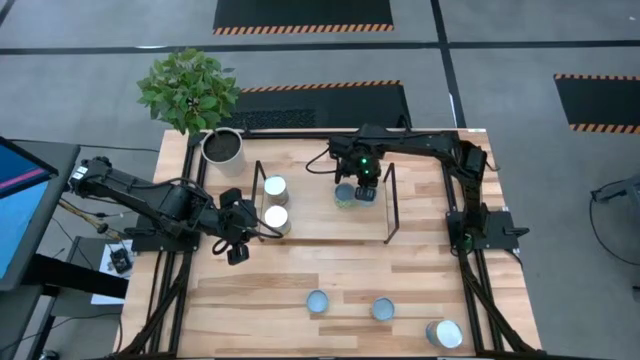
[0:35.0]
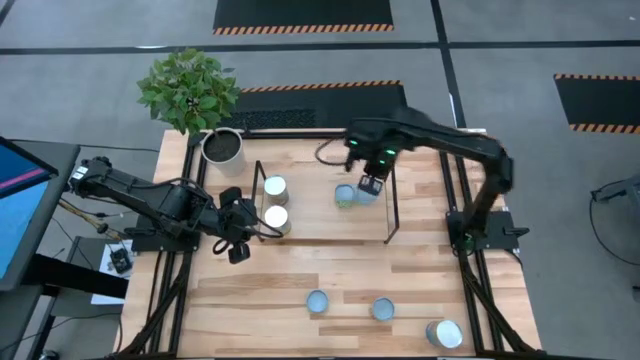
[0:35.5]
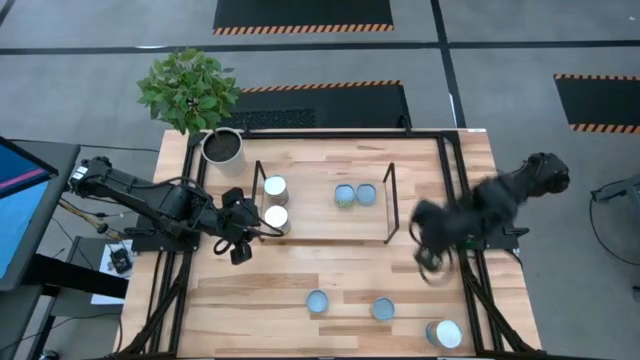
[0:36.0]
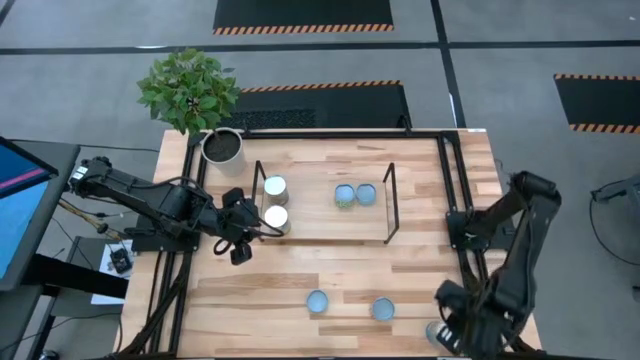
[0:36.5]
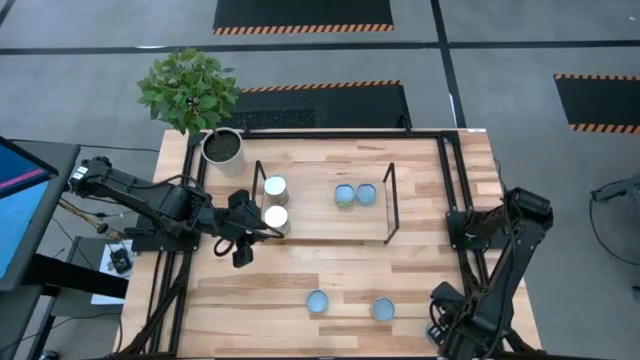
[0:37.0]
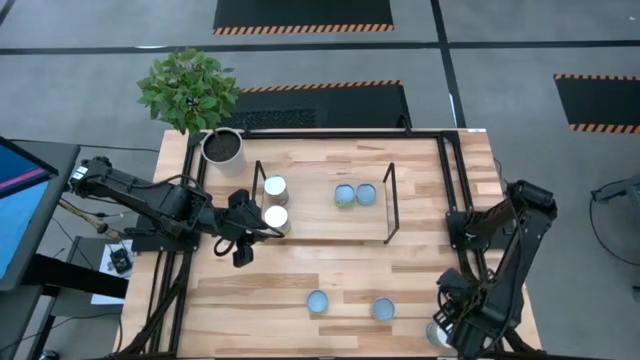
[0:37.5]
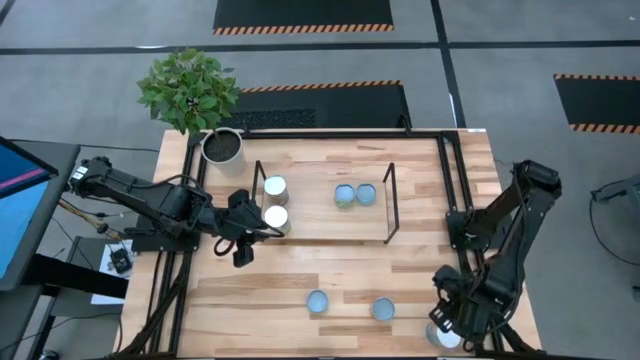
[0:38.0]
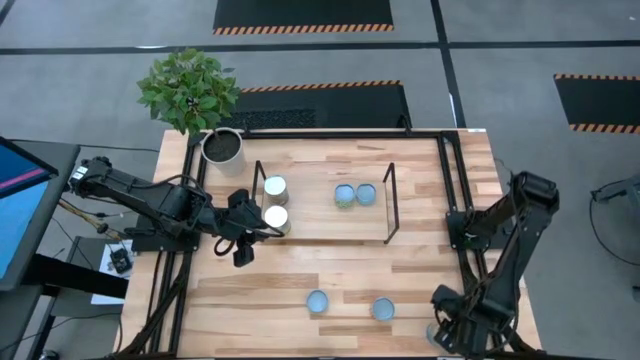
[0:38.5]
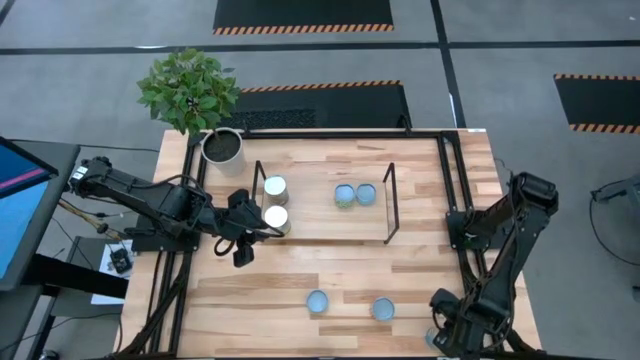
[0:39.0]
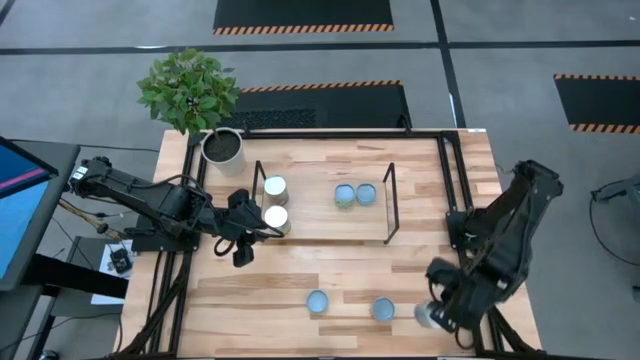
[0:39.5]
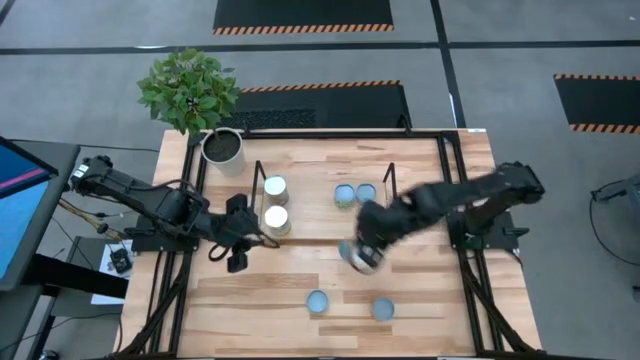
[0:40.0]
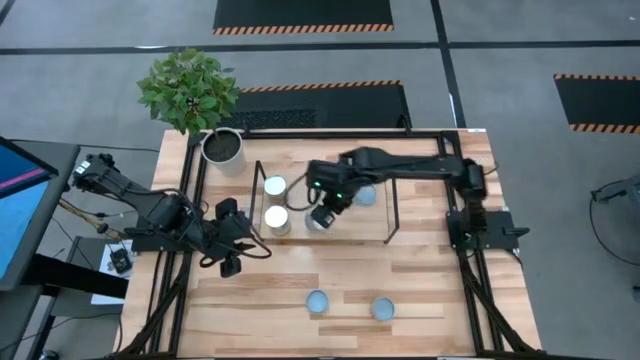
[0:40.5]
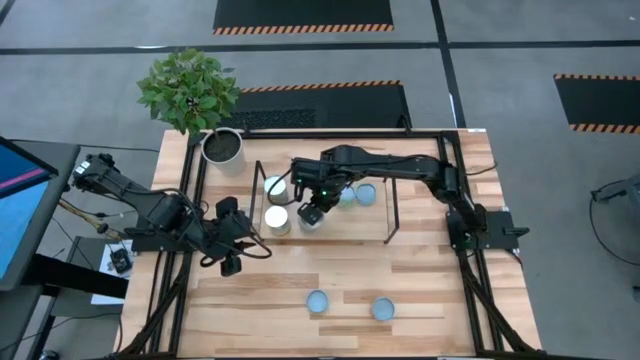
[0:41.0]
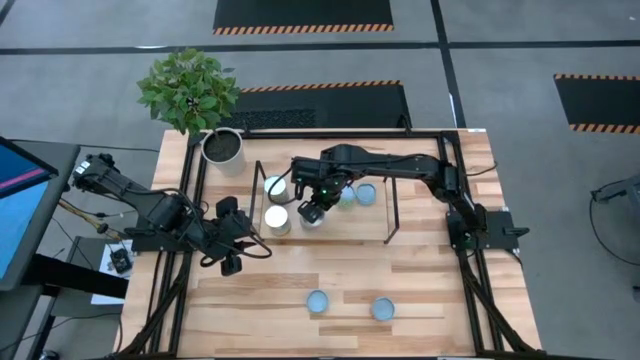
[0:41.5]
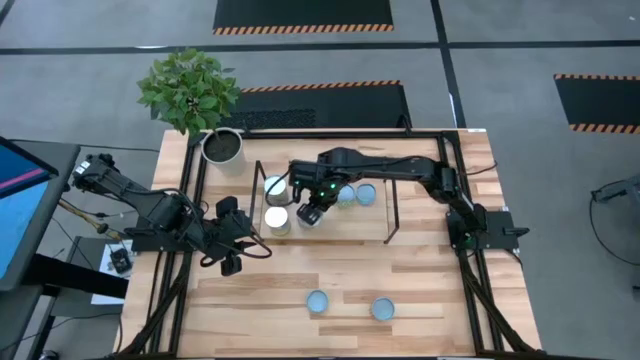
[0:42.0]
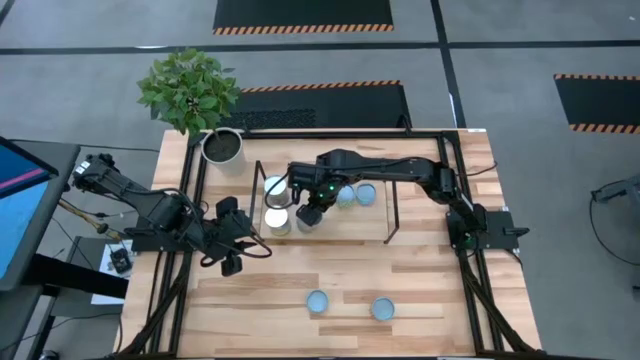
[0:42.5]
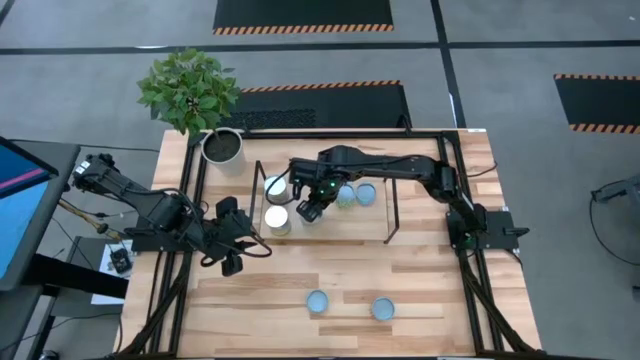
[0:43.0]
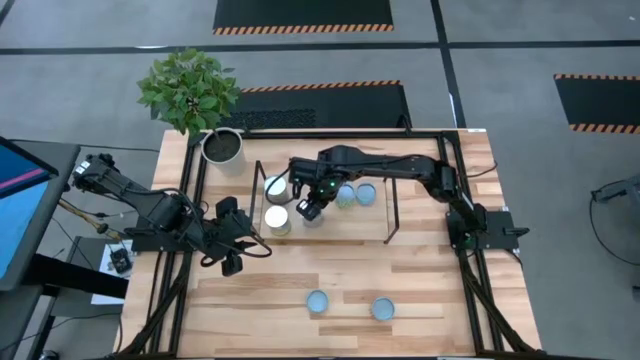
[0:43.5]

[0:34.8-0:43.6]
Task: Pick and place cans onto a shelf
Put the canned tomatoes on the shelf

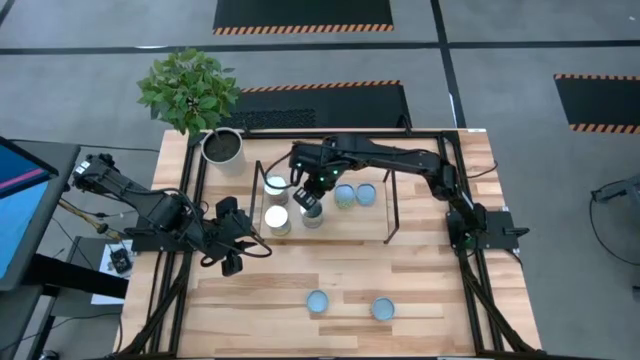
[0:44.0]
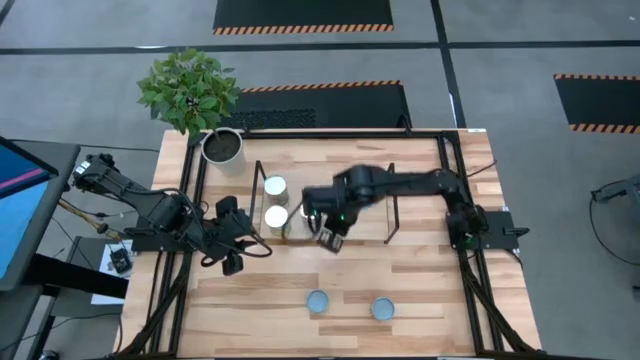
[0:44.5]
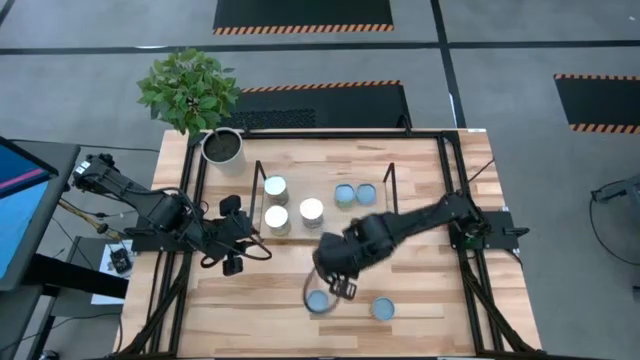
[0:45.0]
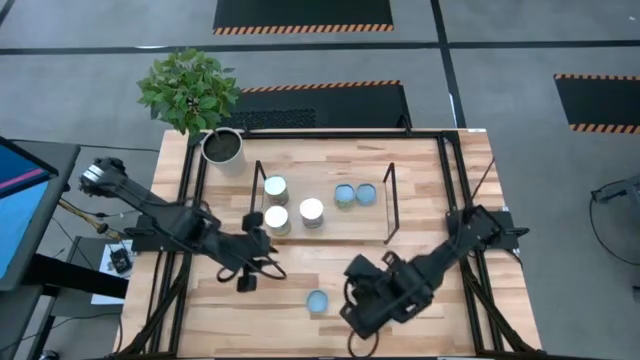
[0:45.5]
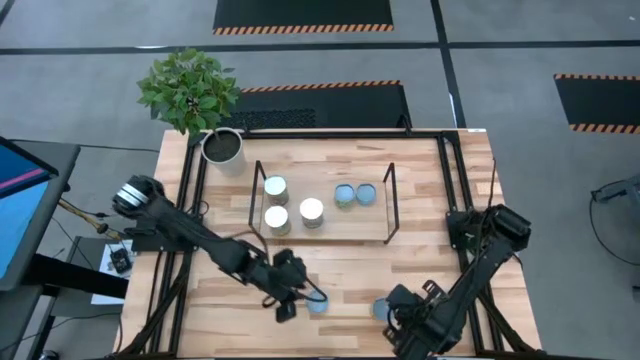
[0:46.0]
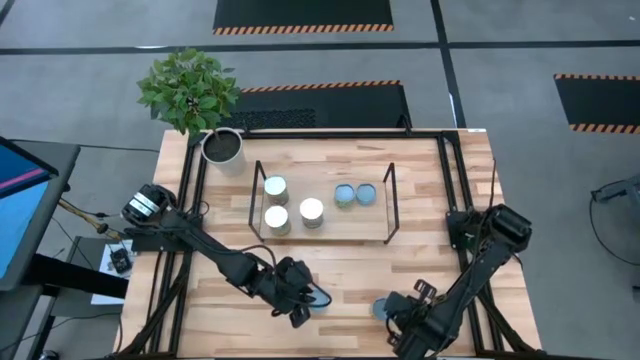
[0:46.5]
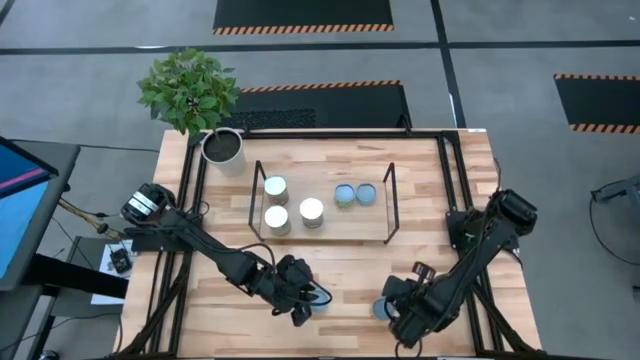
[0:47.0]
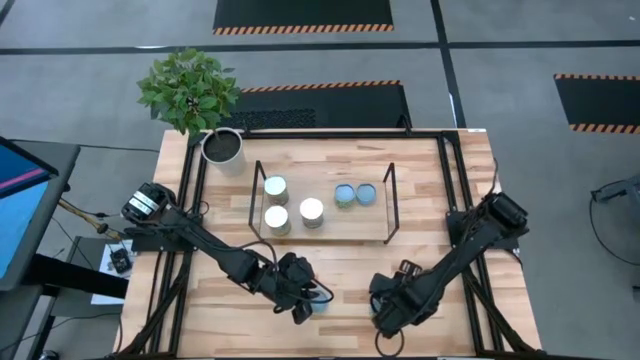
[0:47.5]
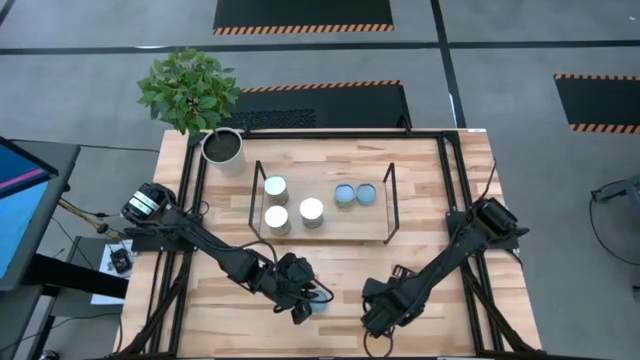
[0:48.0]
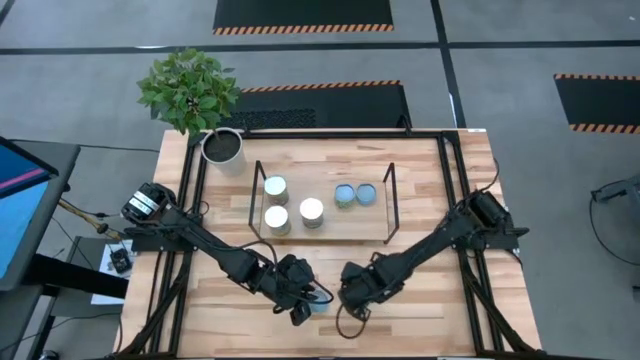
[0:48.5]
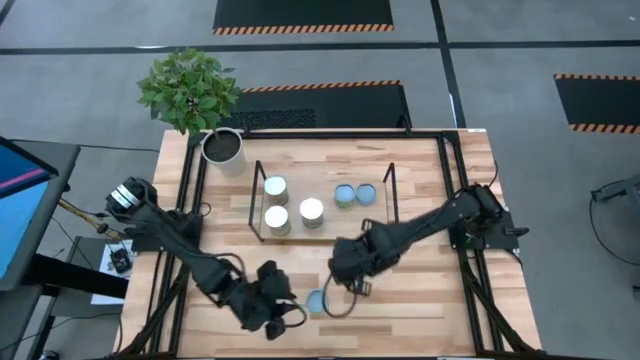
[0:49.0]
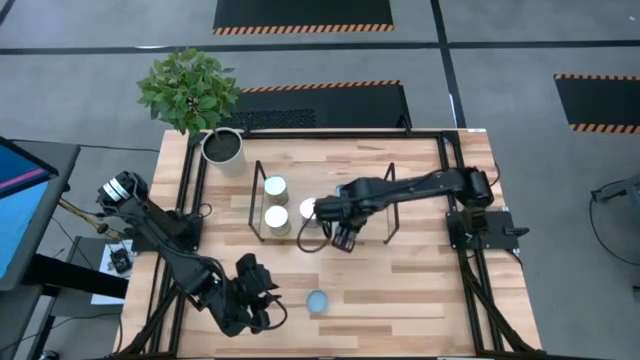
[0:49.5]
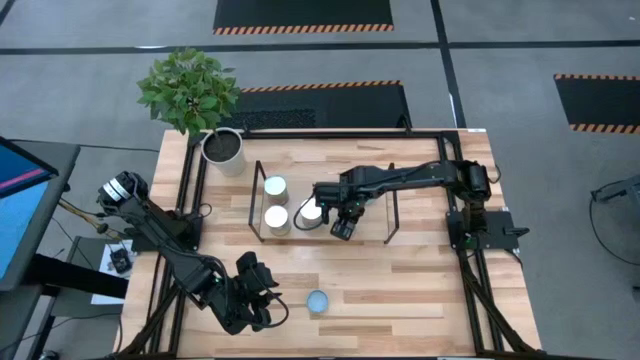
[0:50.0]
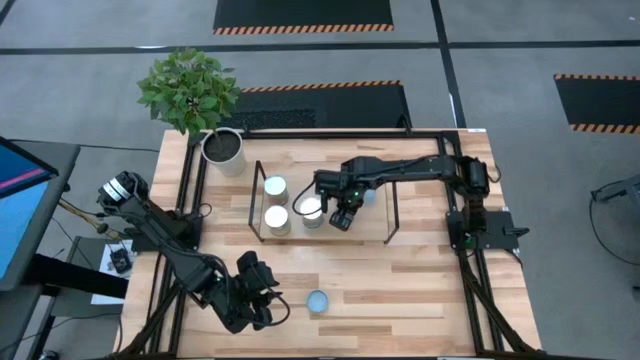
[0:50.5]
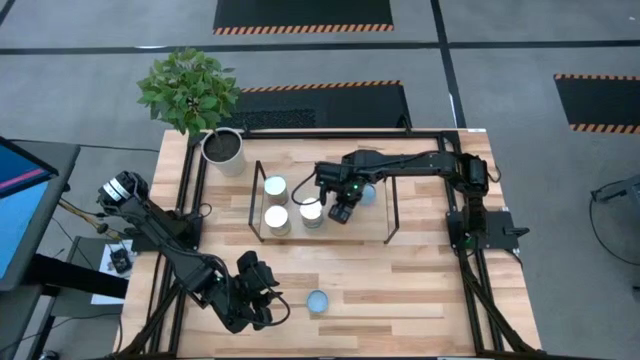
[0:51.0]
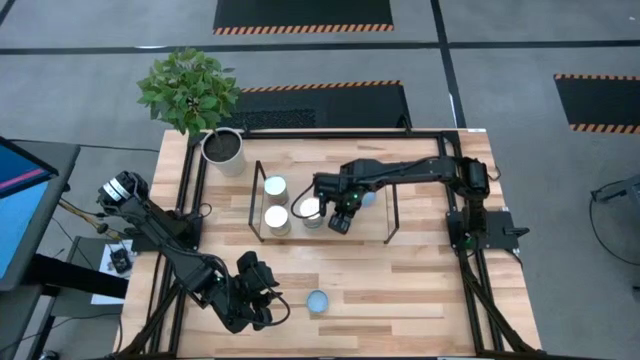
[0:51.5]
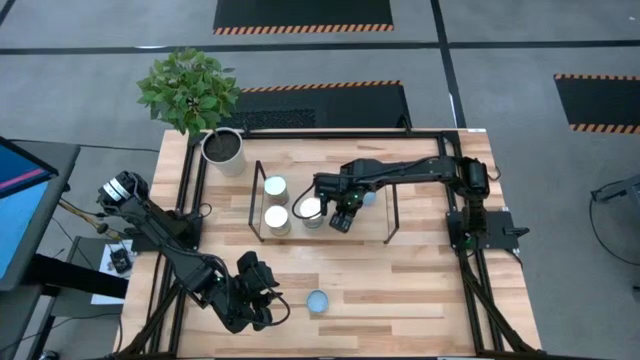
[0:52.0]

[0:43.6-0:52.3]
Put the canned black beans on the shelf

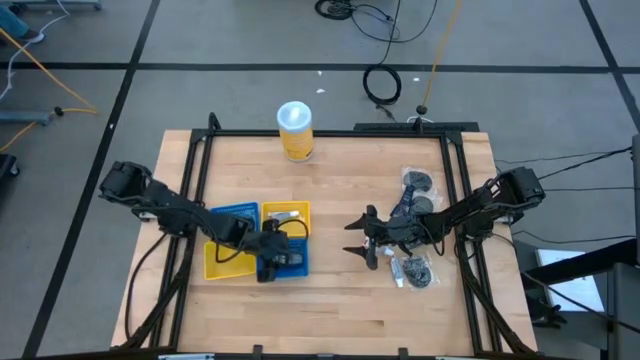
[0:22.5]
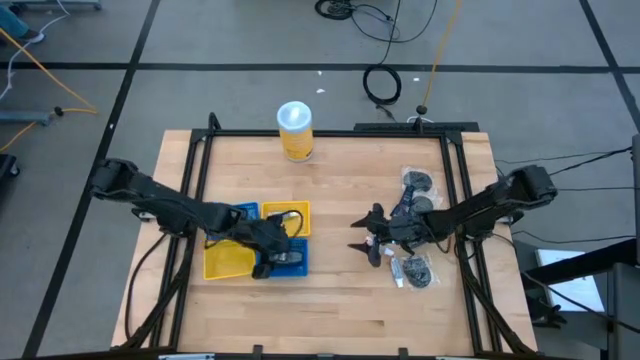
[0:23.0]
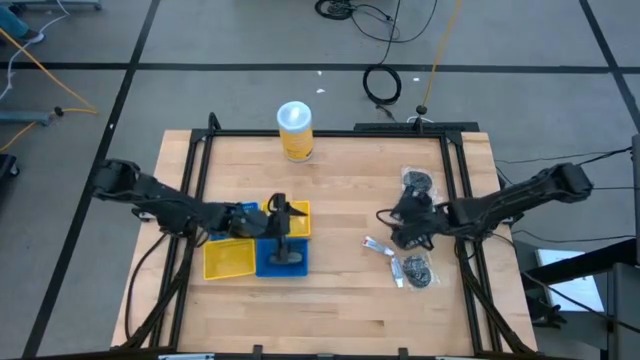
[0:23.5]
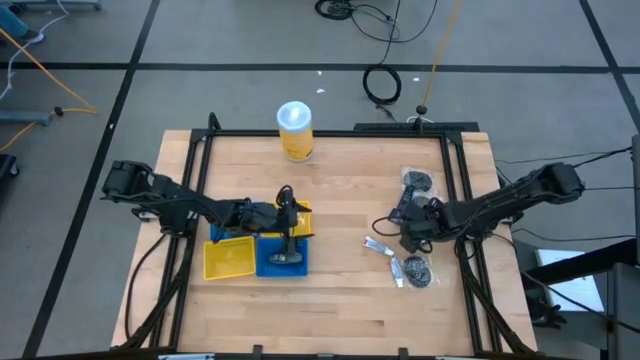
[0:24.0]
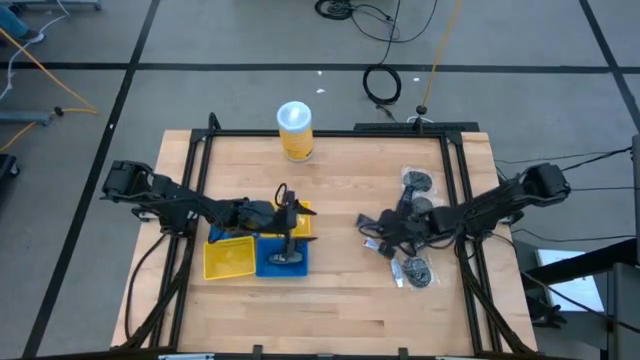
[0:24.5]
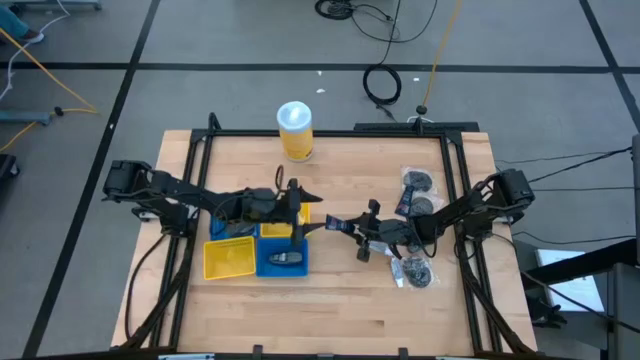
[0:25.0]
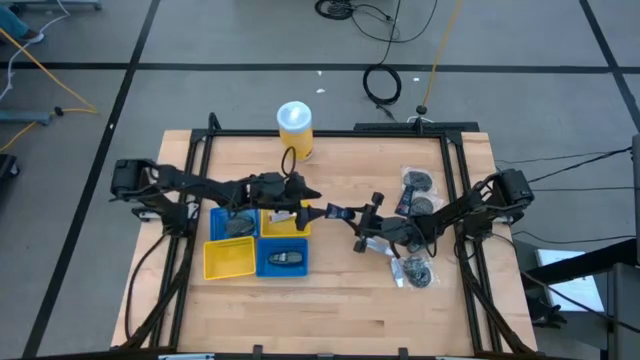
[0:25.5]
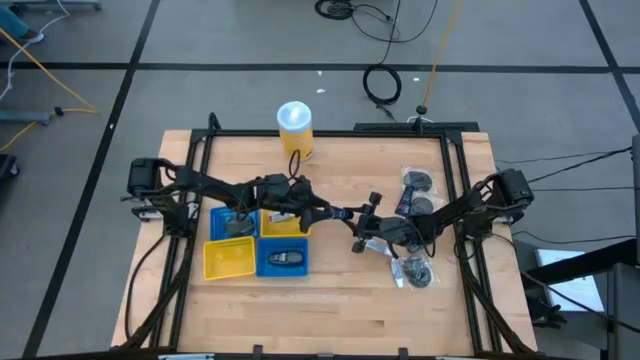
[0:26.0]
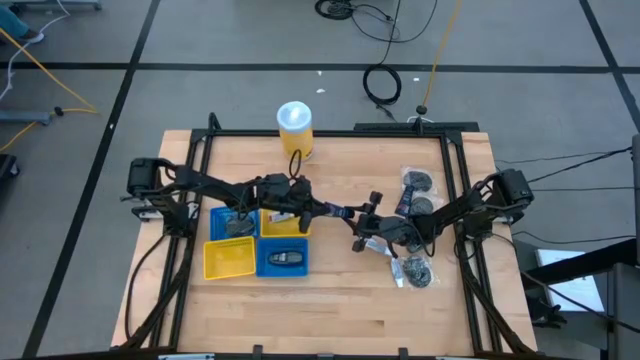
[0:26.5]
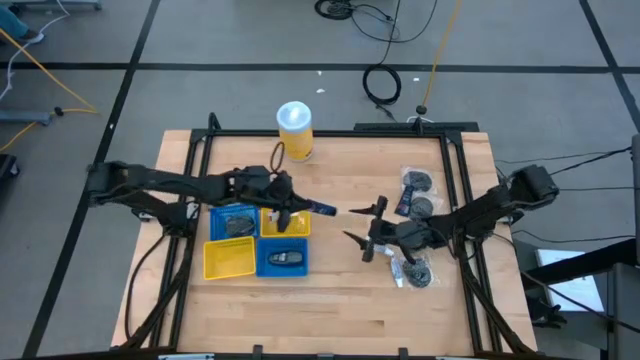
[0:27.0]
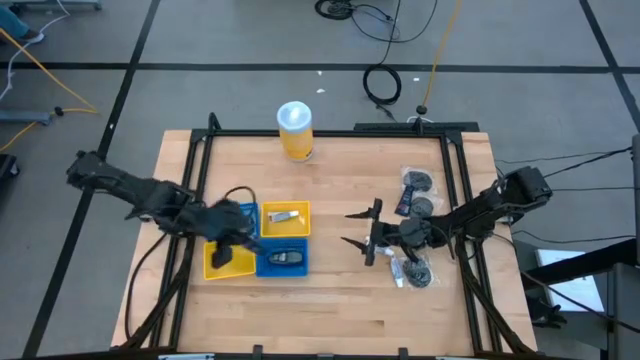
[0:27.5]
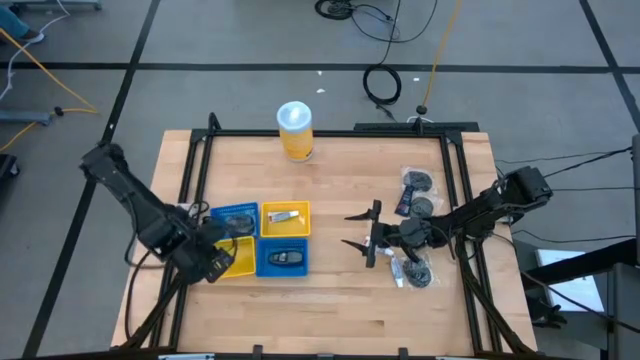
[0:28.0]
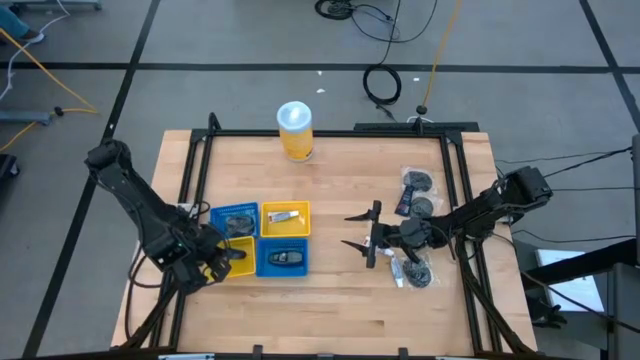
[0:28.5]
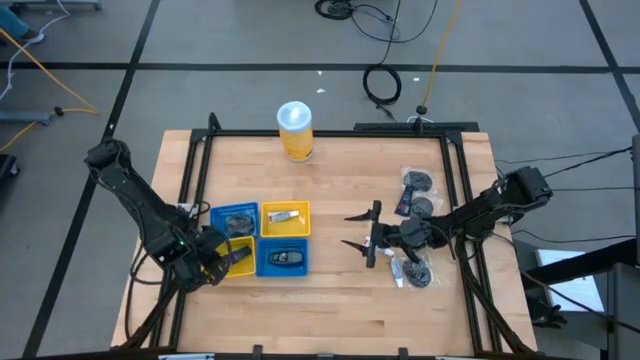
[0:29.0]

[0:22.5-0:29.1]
Task: Pick & Place Travel size toiletries
Put the blue shaving cream into the bottom yellow bin
